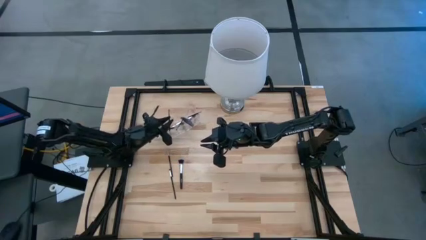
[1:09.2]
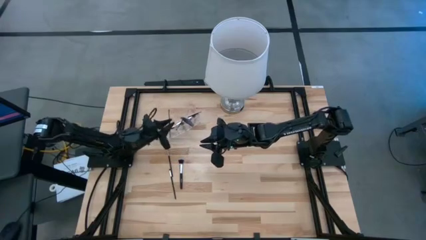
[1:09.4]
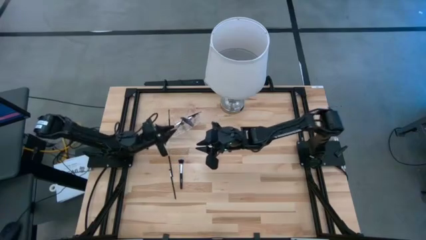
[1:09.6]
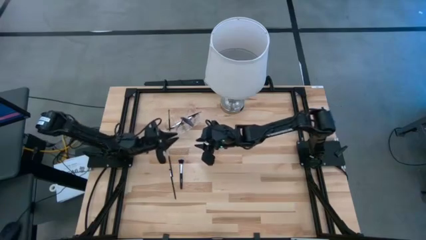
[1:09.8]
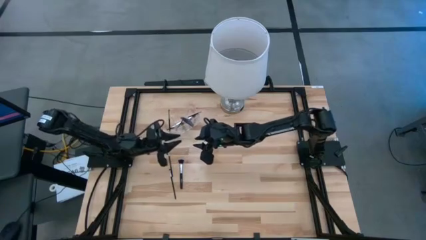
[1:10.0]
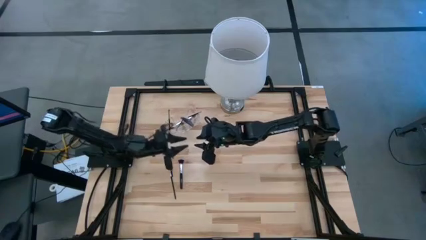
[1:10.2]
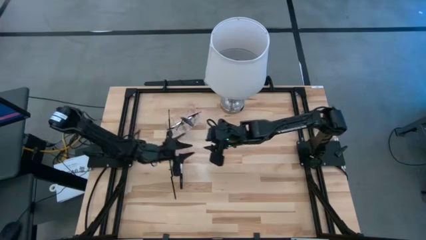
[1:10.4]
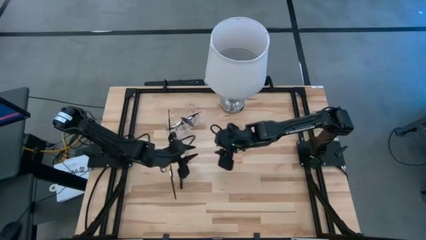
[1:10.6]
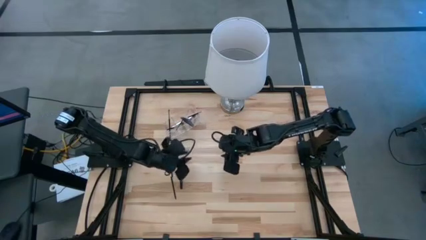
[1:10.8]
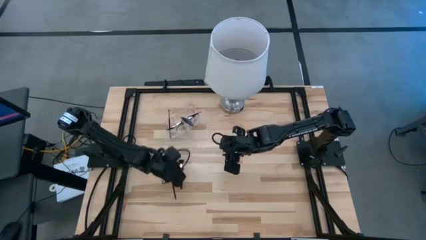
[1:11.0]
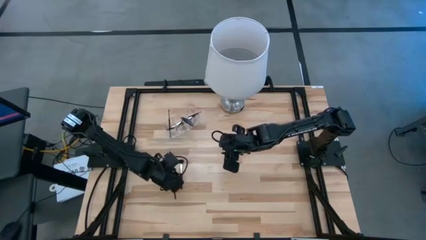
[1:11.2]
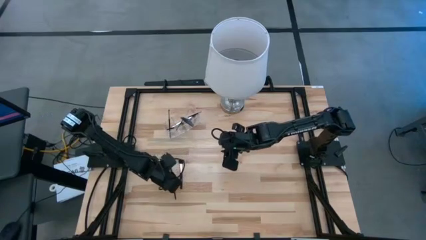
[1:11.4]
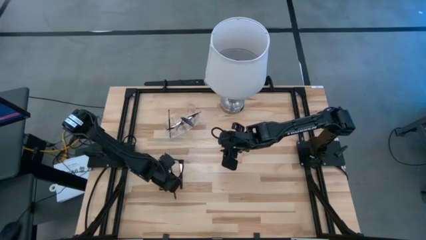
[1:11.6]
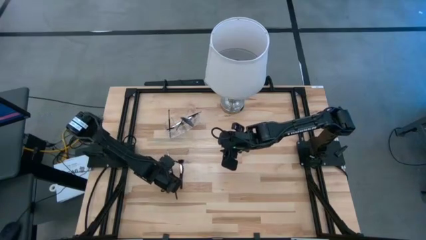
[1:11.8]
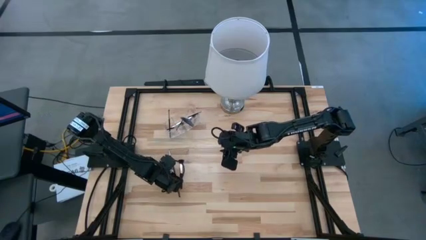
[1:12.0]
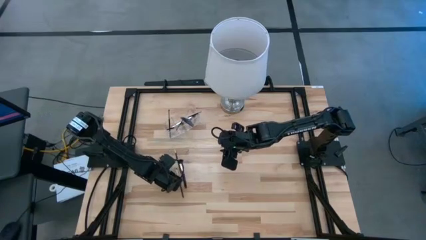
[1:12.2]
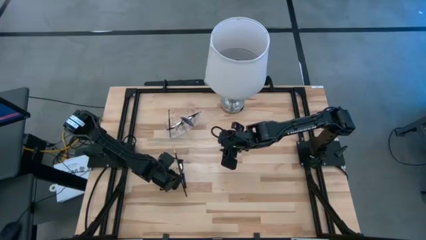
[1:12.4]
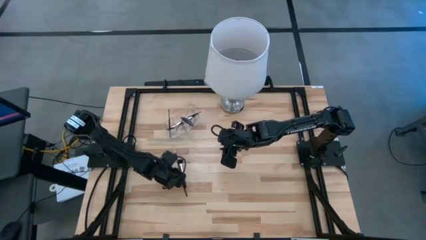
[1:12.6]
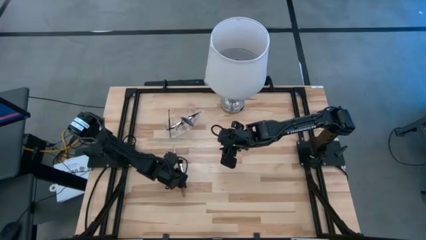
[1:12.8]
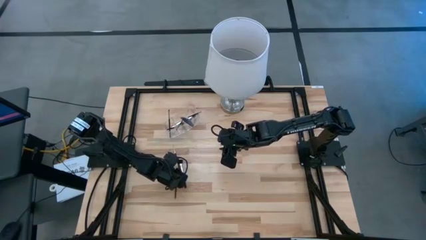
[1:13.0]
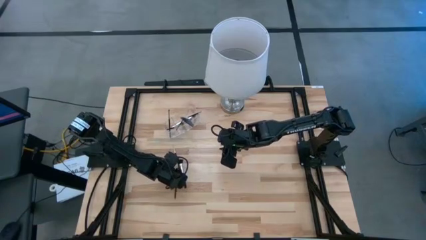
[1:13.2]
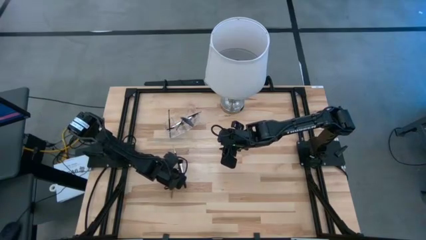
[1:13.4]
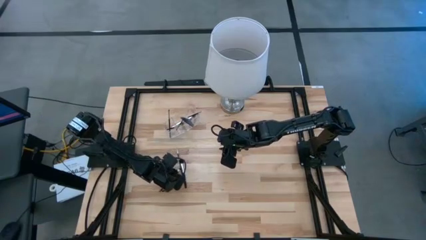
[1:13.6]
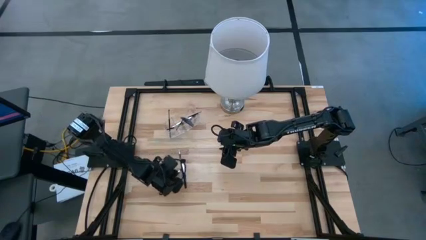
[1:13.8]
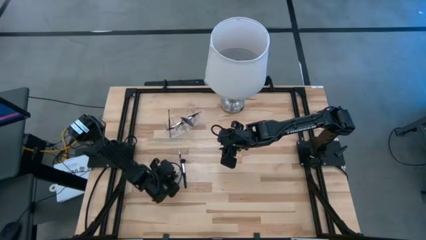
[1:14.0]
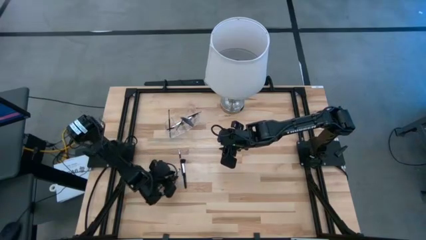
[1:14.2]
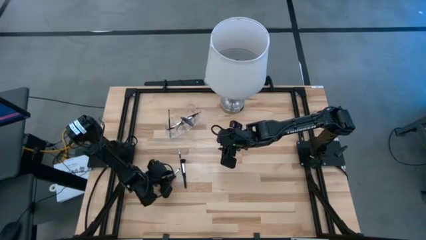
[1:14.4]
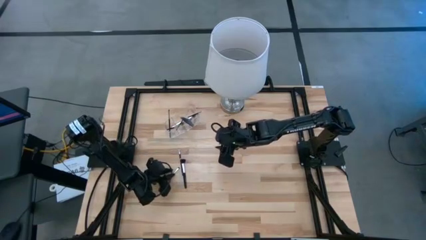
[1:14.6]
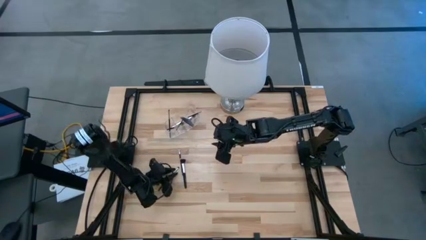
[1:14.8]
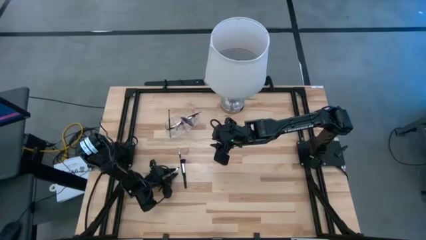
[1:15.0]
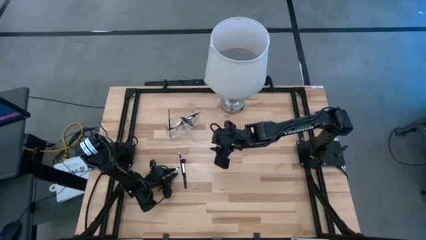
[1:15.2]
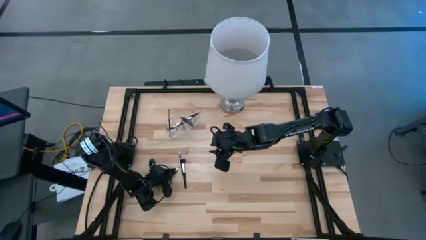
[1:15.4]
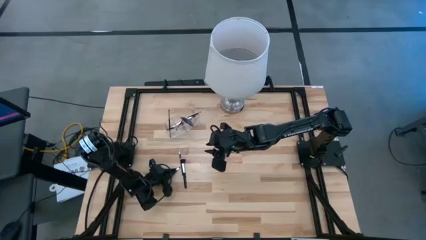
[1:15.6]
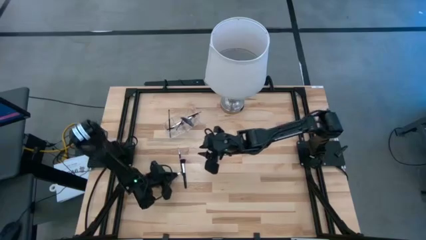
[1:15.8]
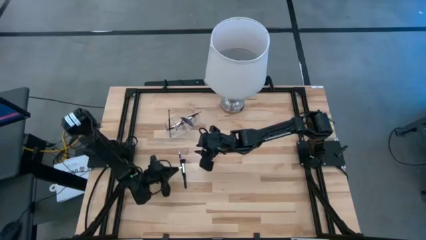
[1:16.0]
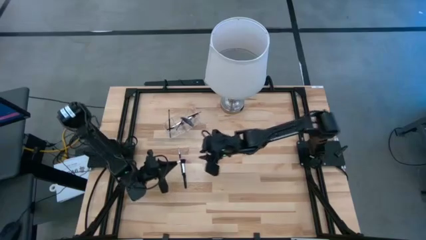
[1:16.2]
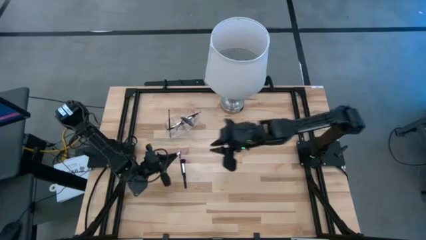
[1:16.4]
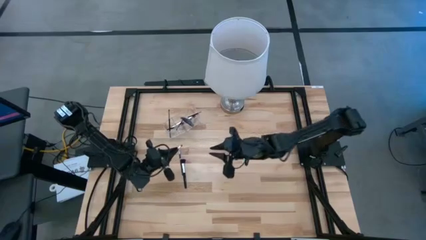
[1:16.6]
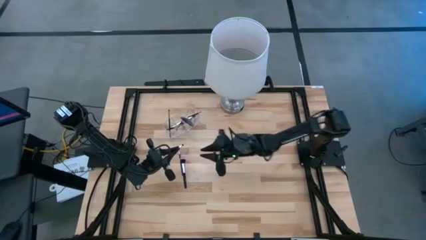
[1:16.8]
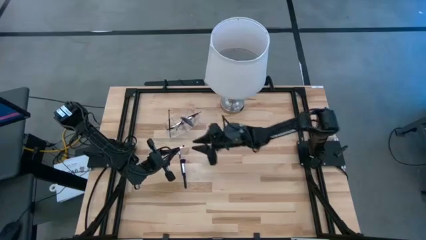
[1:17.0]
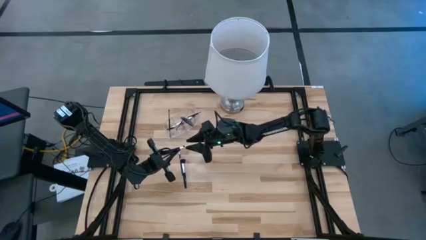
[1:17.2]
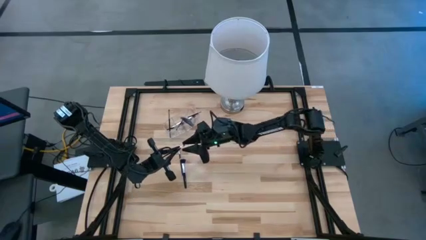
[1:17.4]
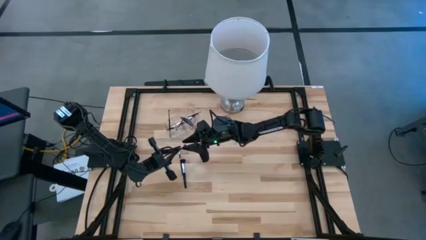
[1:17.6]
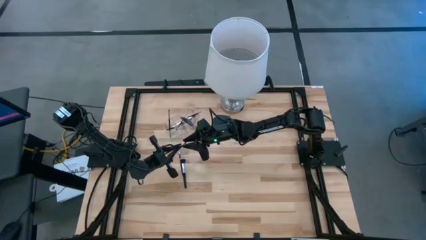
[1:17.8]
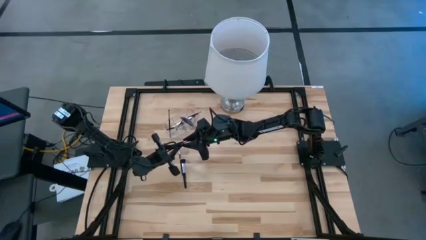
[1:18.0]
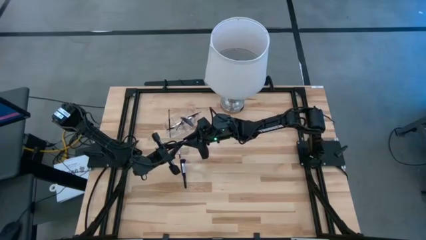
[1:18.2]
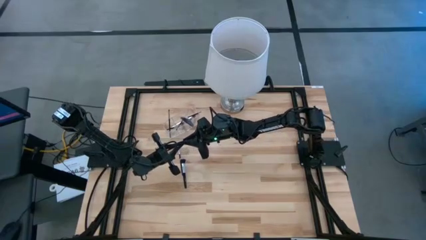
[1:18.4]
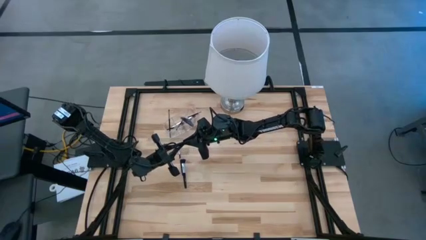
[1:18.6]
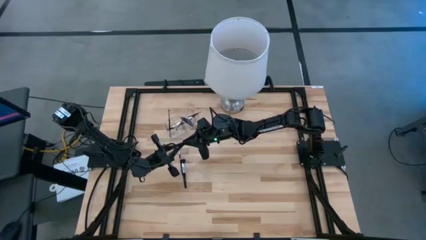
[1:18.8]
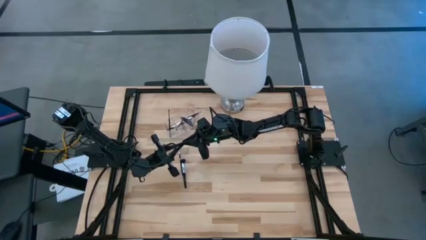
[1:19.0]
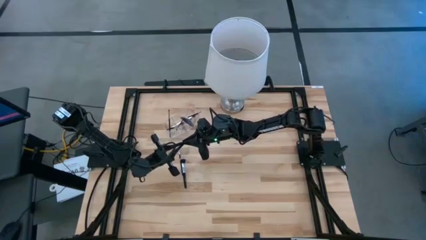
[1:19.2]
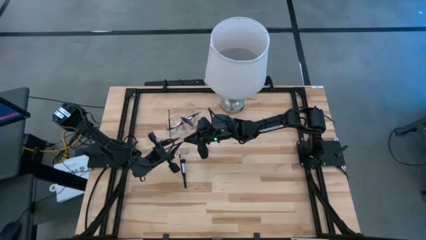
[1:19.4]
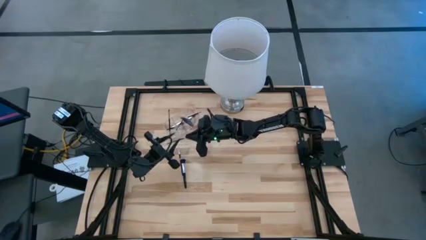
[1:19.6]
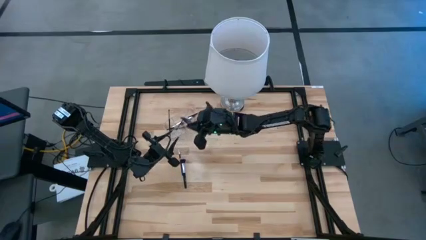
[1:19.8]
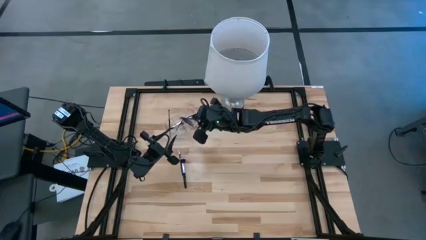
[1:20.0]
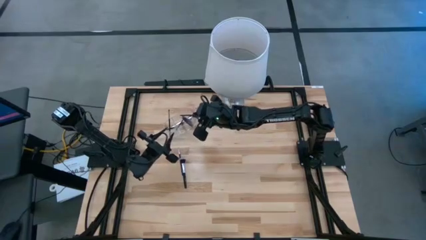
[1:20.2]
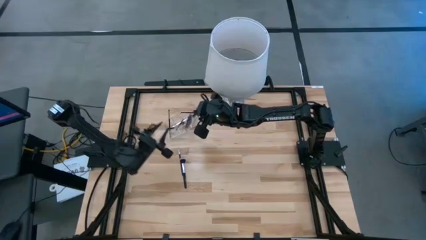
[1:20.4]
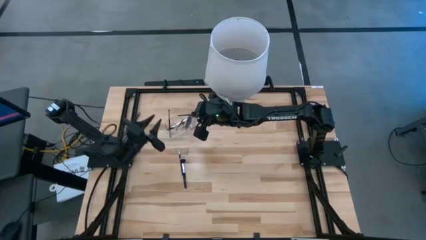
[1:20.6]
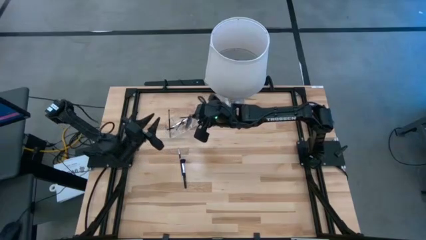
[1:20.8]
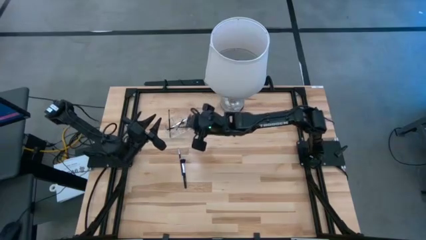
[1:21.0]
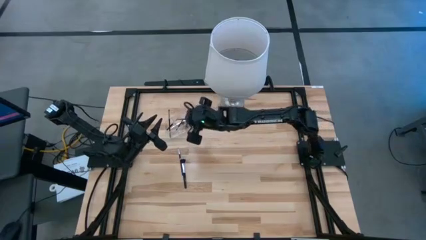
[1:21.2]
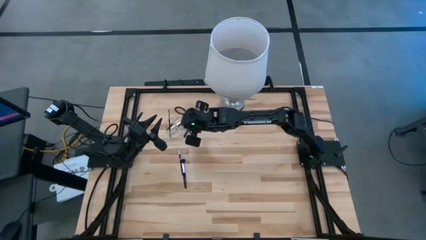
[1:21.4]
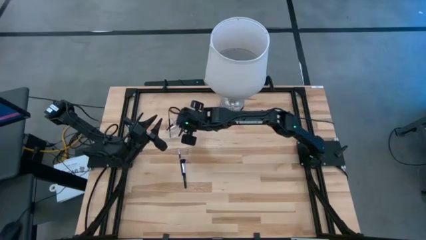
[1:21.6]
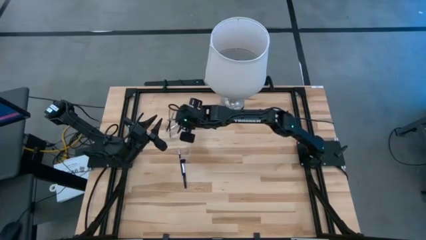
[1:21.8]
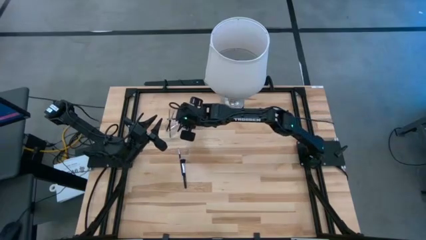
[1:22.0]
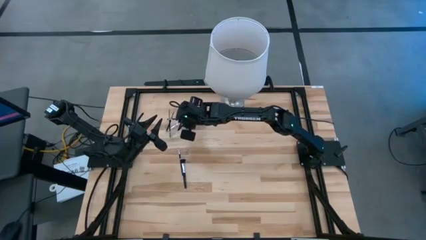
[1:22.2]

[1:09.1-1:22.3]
Task: Put items in baskets/containers
Put the black eyeshadow brush into the transparent organizer

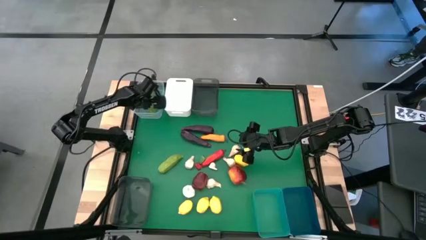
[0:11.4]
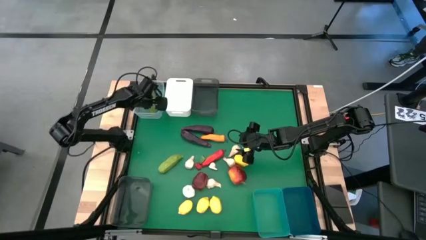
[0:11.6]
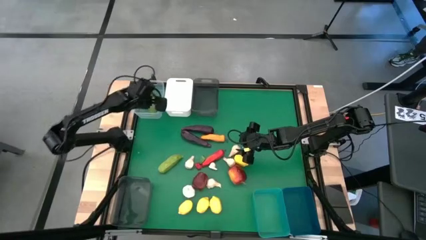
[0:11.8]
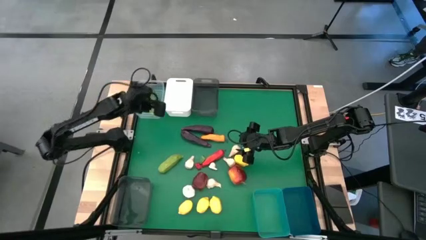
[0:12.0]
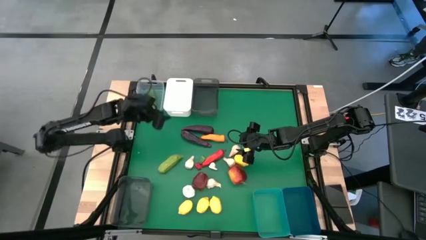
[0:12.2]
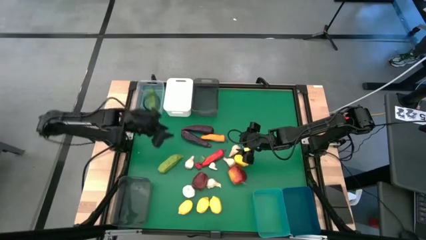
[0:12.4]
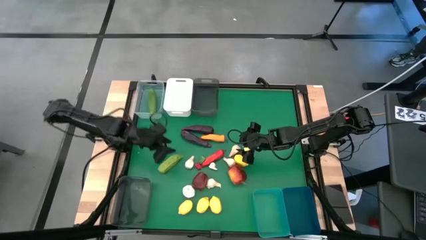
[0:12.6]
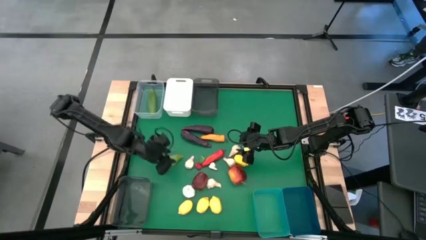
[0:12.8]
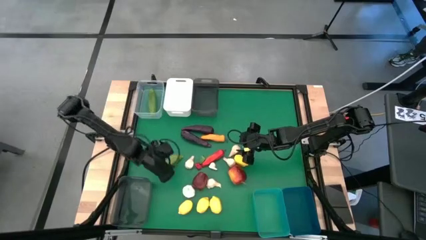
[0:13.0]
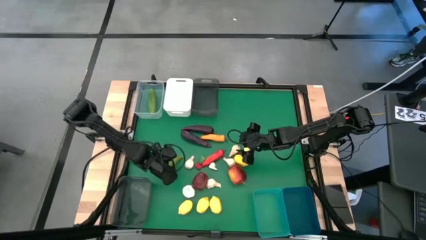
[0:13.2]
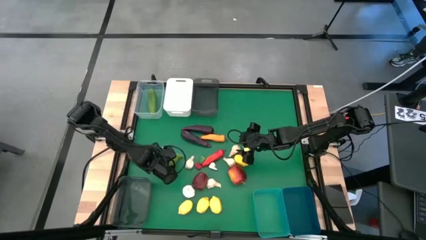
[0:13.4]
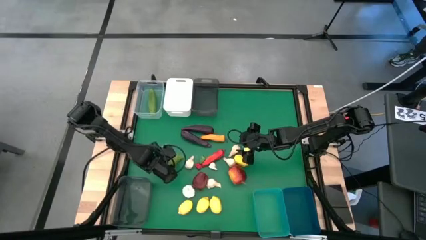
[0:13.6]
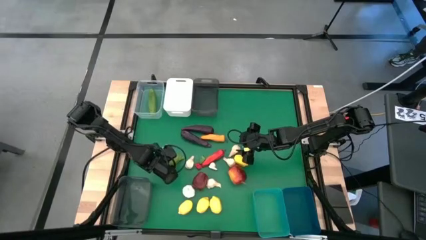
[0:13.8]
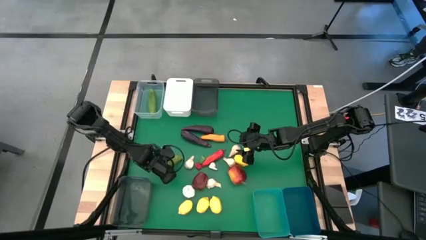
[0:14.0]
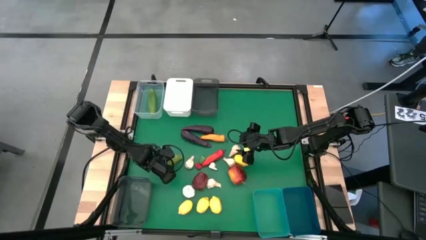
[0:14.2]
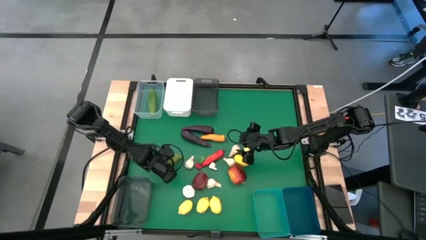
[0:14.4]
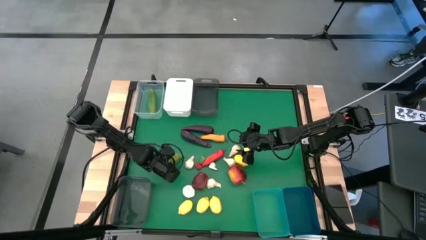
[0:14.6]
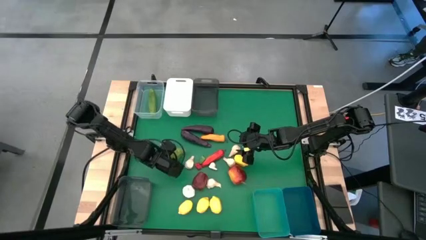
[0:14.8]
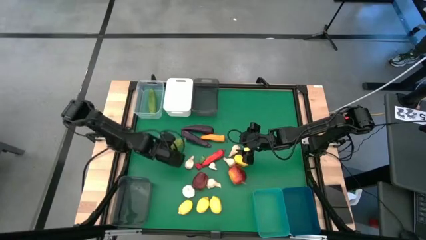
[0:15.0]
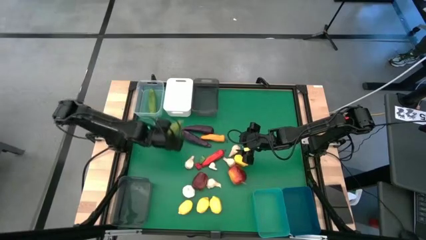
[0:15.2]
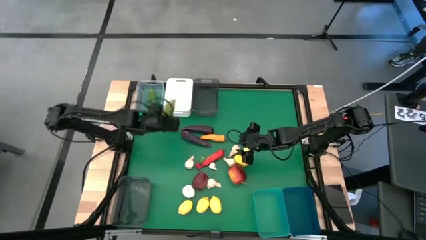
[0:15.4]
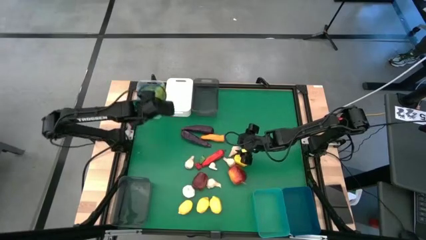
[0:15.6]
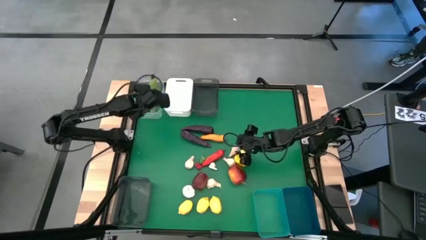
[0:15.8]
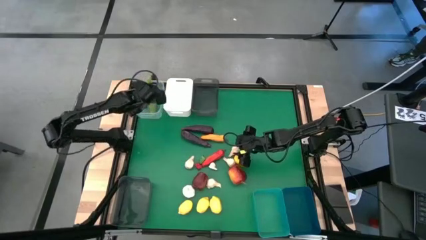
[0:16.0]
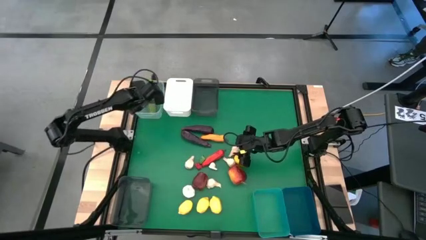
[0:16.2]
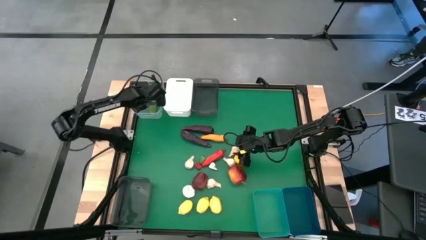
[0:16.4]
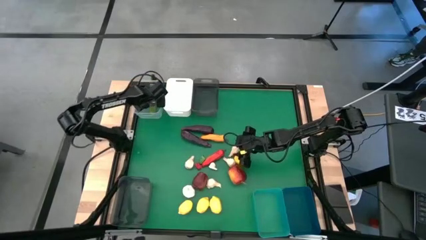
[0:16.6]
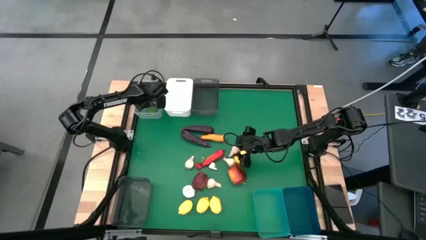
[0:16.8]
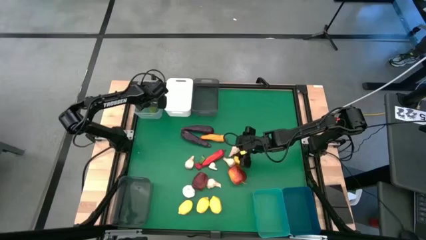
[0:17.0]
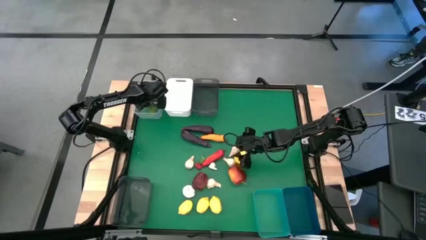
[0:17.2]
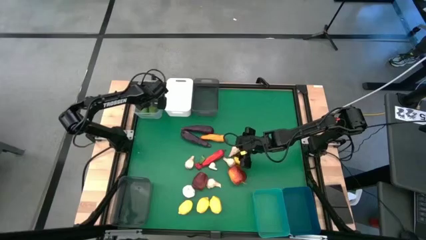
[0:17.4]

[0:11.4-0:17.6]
Task: Sort produce into baskets
Put the green cucumber into the transparent bin
